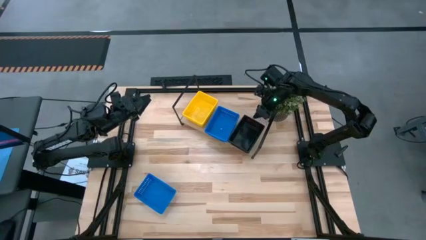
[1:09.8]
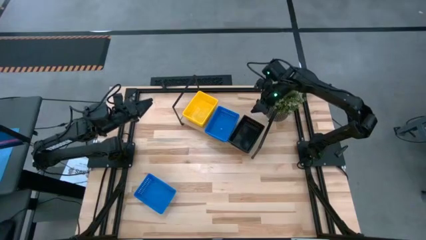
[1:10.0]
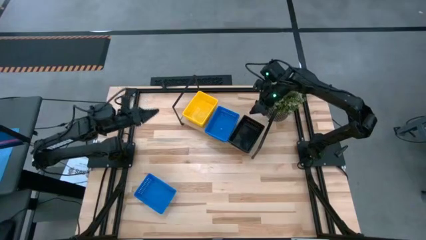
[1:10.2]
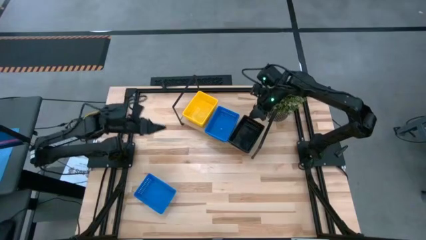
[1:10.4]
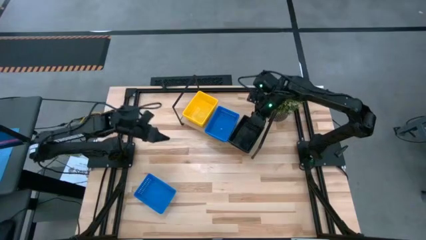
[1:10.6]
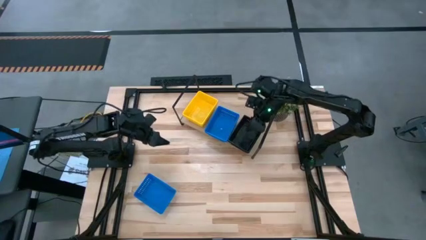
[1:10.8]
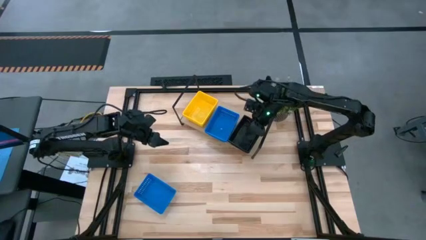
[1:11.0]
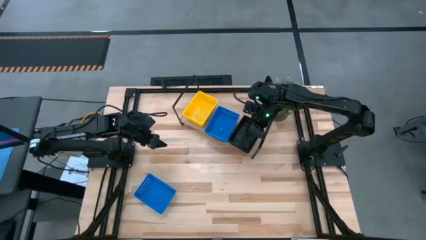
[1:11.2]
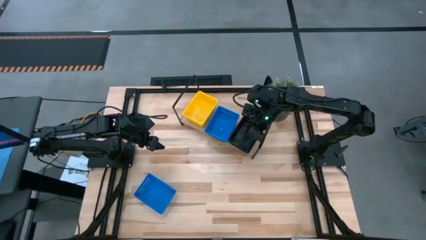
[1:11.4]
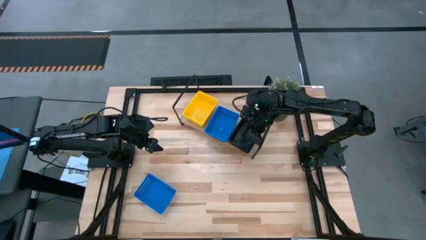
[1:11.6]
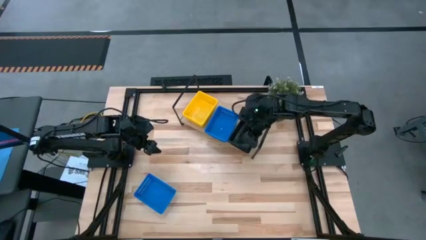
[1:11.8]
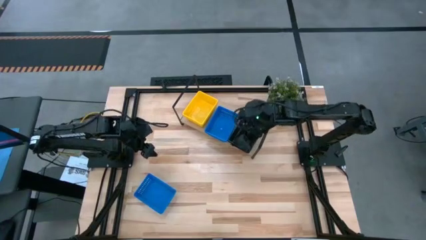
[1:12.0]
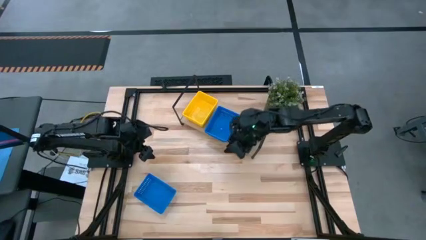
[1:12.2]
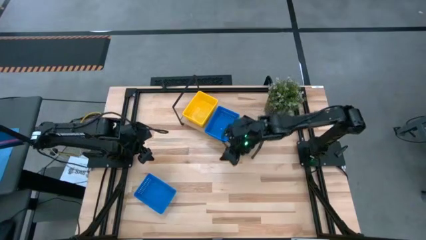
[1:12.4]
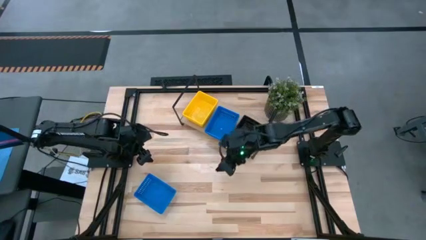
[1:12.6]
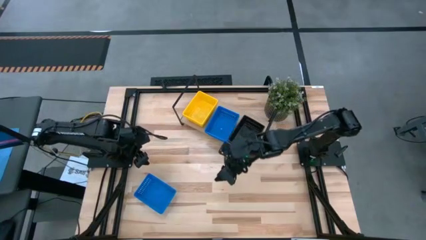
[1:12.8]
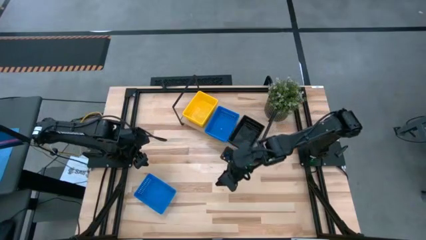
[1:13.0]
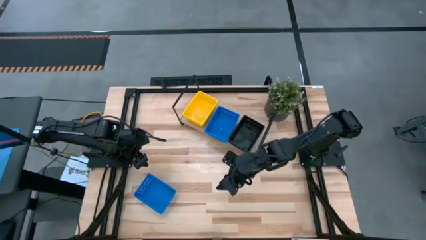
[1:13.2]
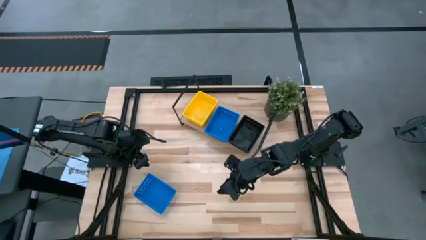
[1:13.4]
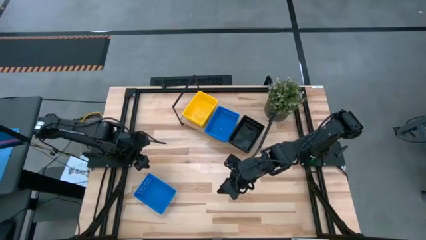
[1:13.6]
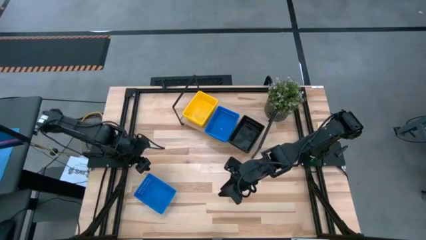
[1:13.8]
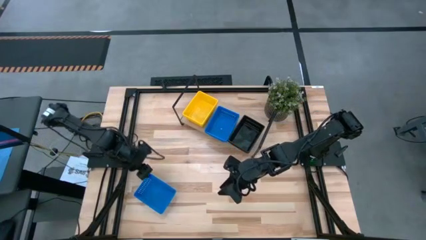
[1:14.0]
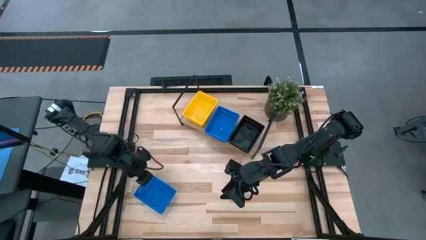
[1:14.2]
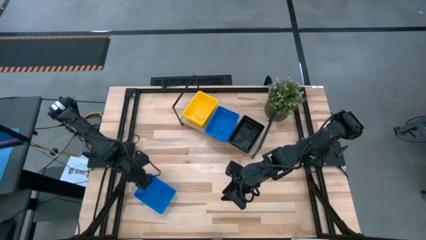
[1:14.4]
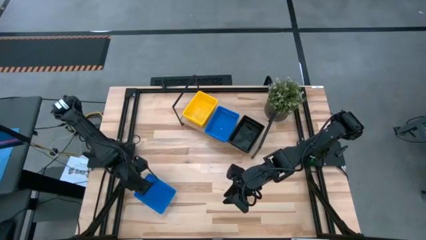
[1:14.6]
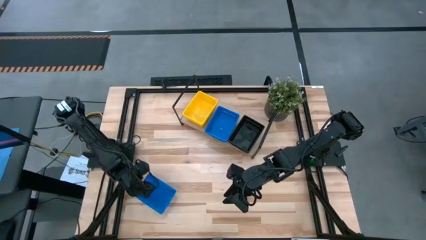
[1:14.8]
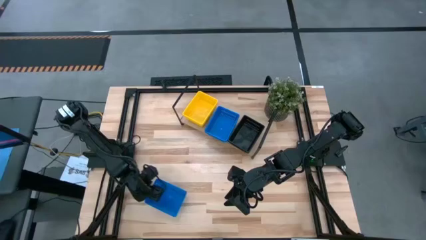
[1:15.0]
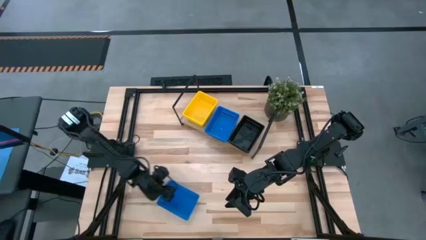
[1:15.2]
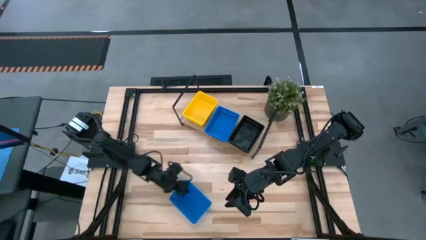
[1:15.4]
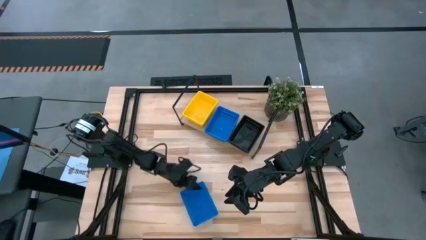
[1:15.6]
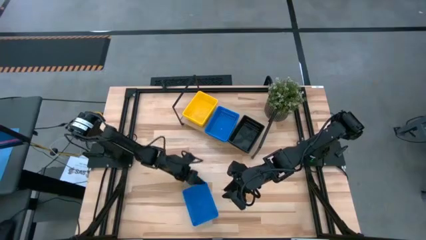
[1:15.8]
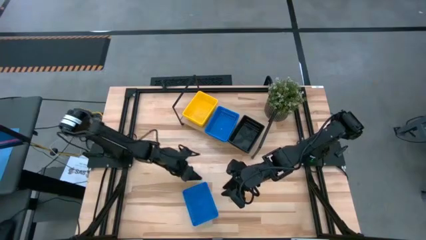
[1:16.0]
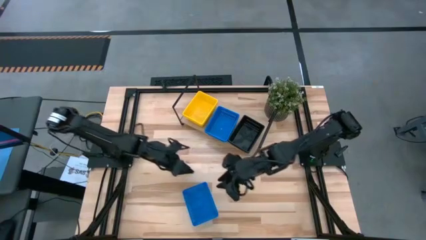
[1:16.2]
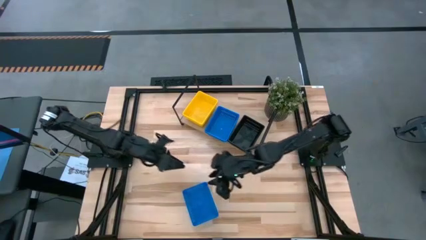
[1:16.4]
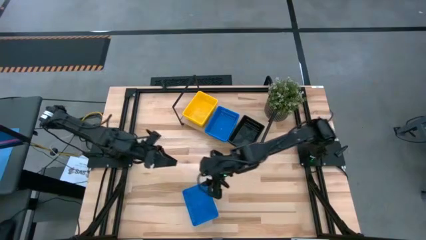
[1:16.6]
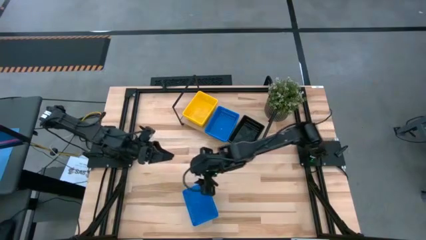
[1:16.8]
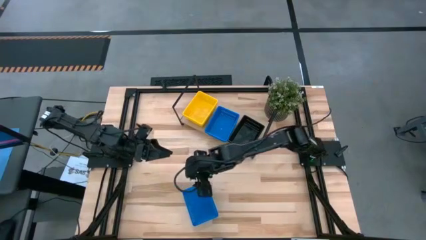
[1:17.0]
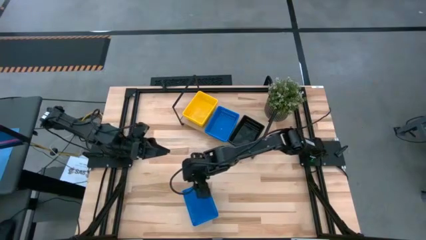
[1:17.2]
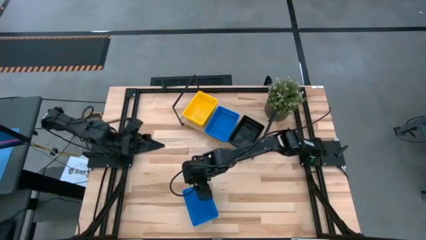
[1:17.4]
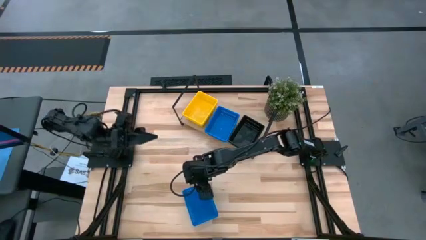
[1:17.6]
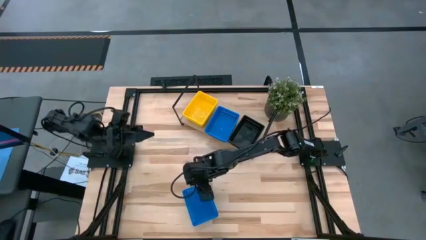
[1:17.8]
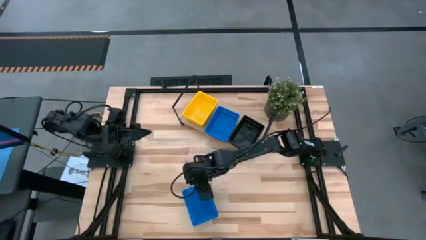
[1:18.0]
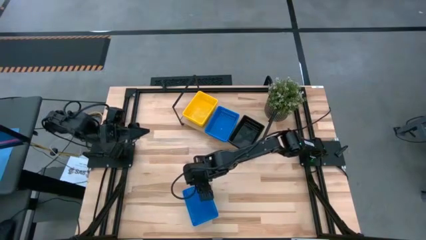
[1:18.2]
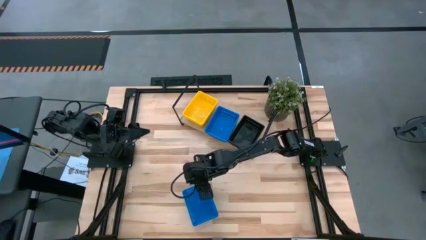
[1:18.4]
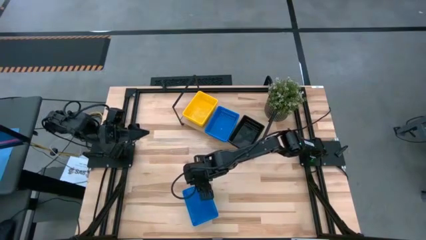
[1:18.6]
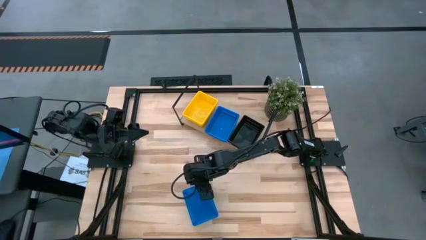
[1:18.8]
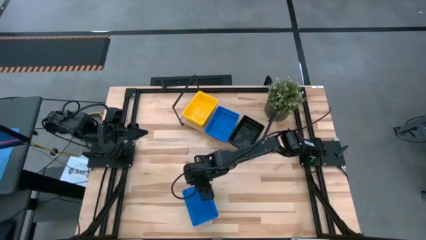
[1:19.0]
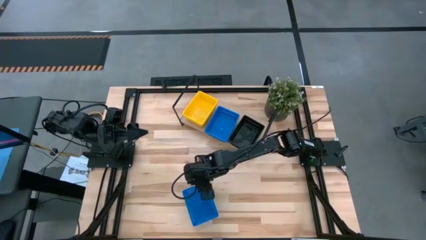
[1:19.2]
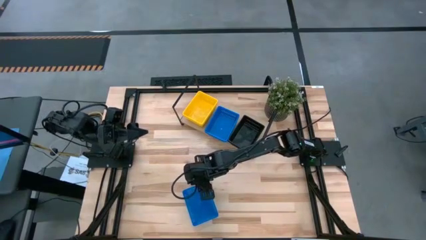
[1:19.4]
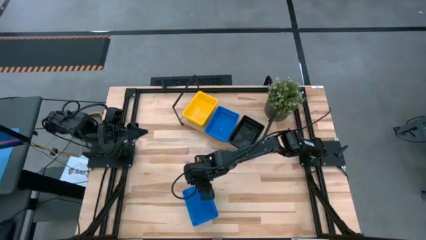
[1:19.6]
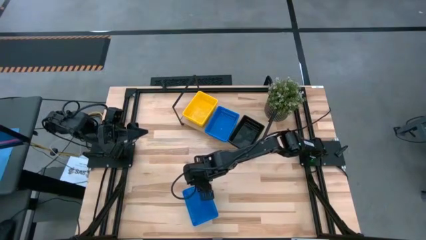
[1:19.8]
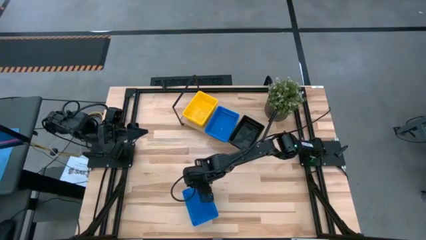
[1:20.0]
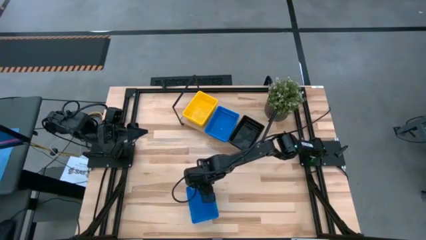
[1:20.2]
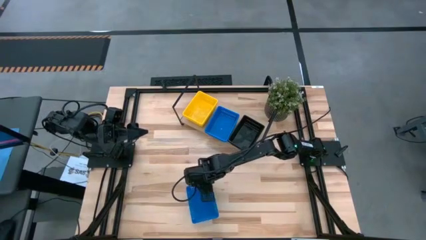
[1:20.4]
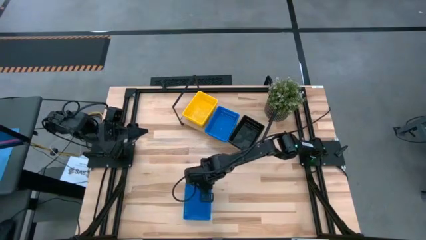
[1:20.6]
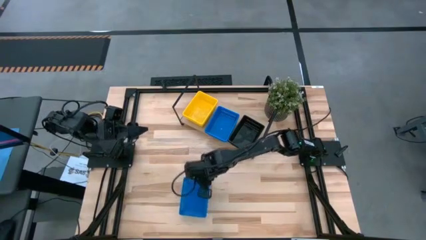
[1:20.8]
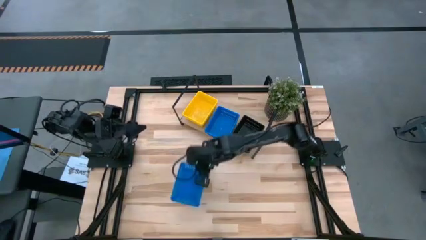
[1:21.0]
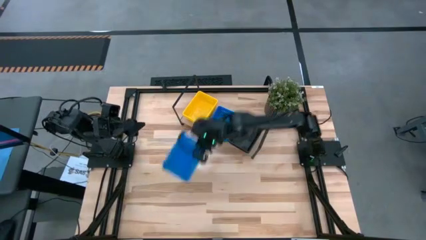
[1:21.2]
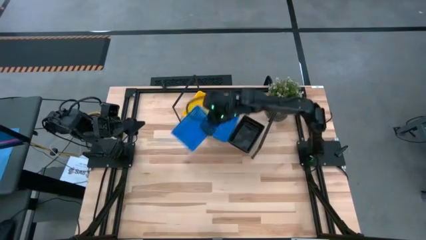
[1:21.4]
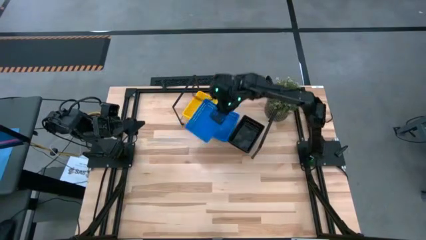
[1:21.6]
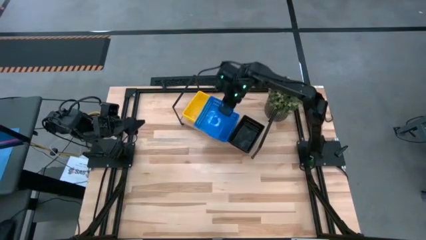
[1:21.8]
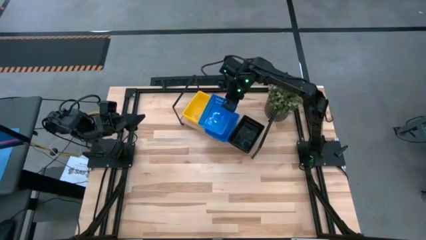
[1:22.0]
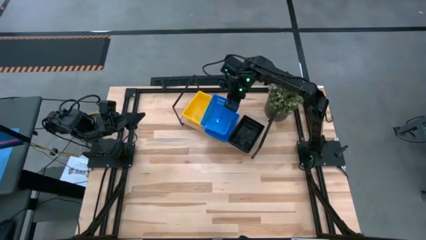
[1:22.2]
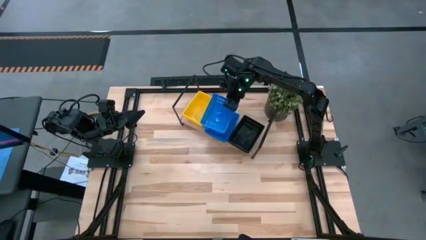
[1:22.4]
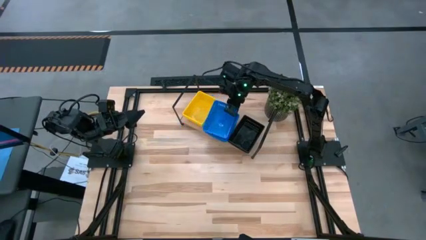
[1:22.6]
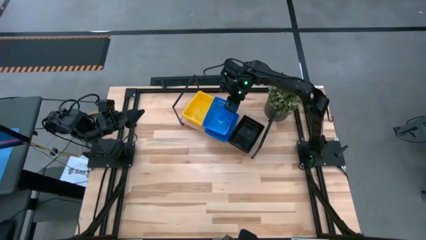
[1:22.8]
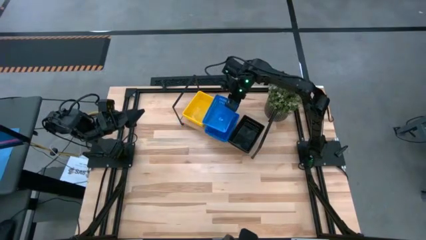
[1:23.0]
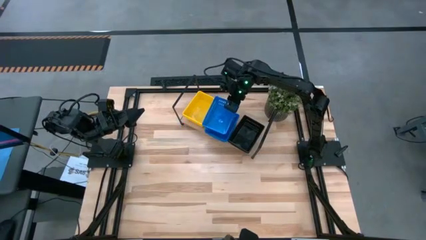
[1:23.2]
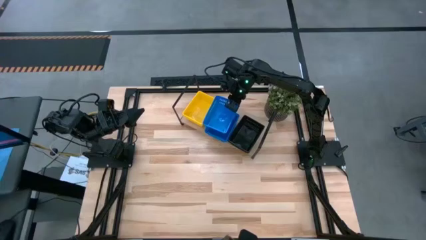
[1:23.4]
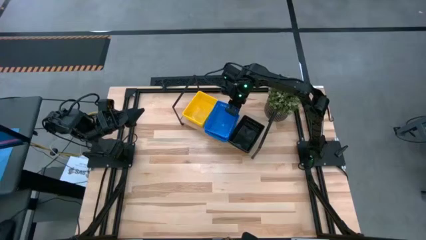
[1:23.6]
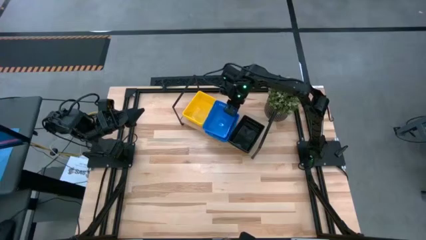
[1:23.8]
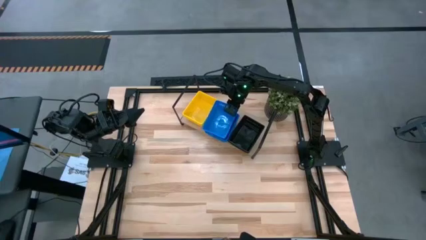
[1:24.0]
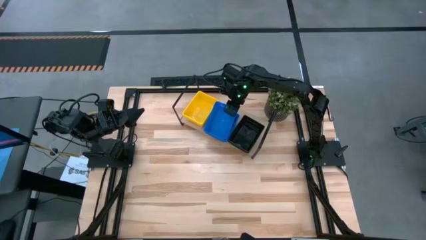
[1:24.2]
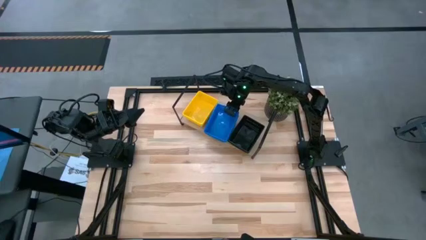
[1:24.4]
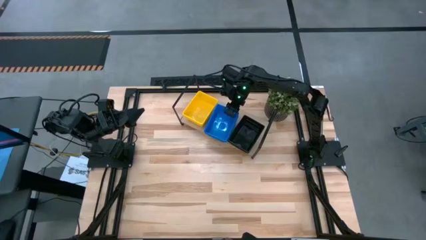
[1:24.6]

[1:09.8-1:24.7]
Task: Stack baskets on shelf by color
Stack the blue bin on the top of the blue shelf on the bin
